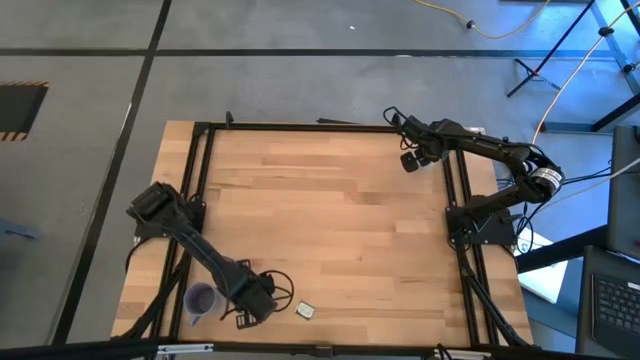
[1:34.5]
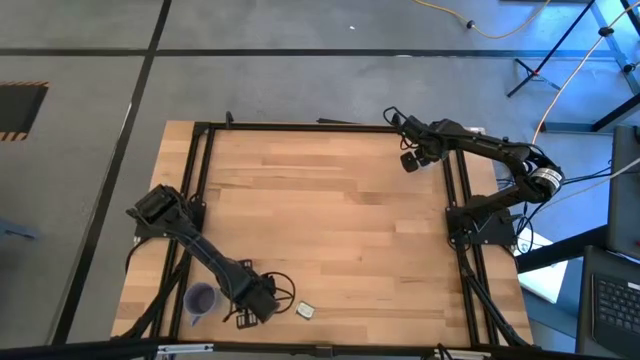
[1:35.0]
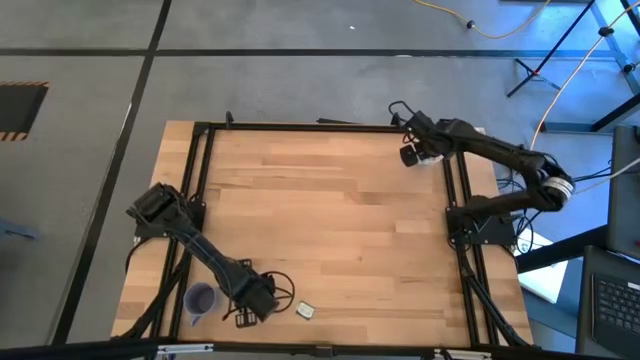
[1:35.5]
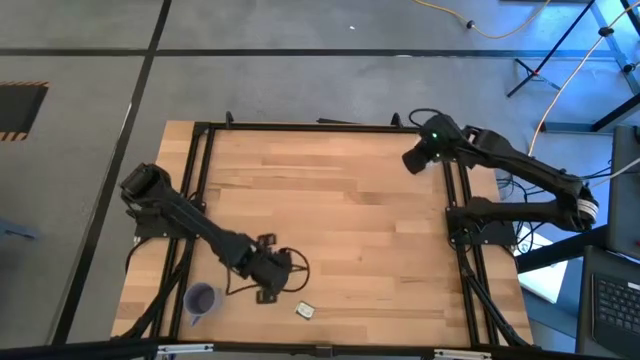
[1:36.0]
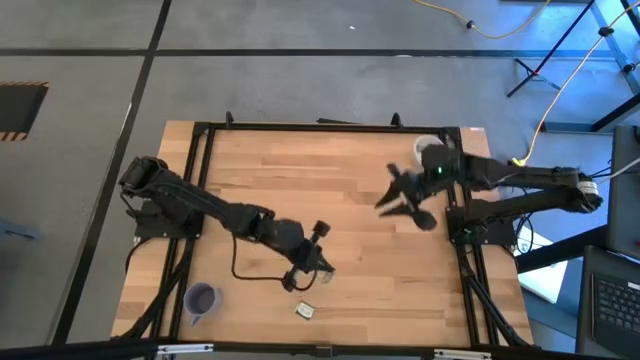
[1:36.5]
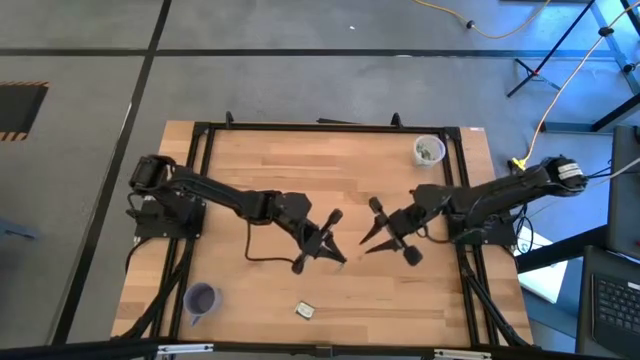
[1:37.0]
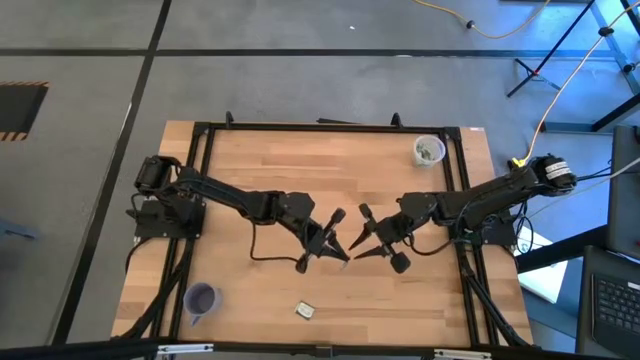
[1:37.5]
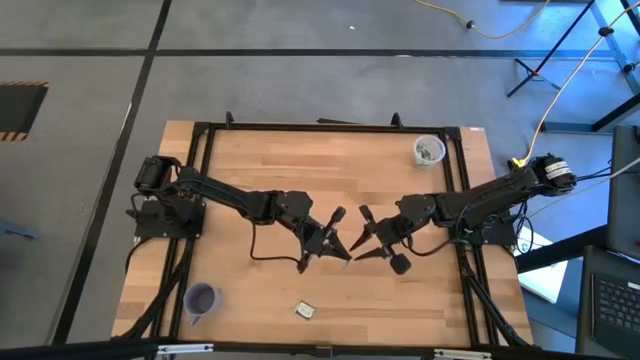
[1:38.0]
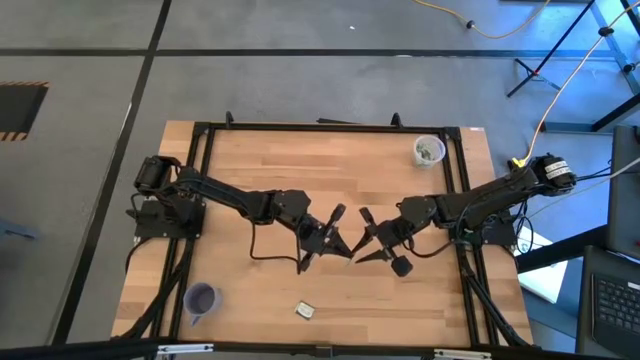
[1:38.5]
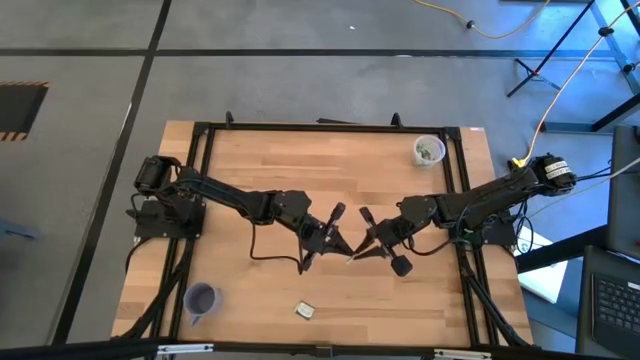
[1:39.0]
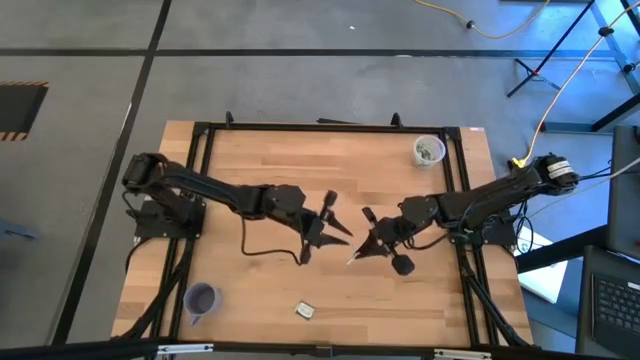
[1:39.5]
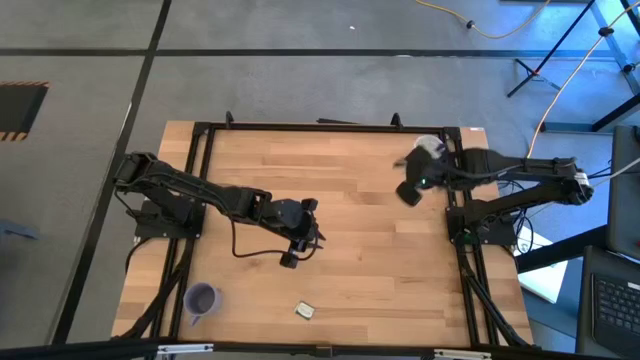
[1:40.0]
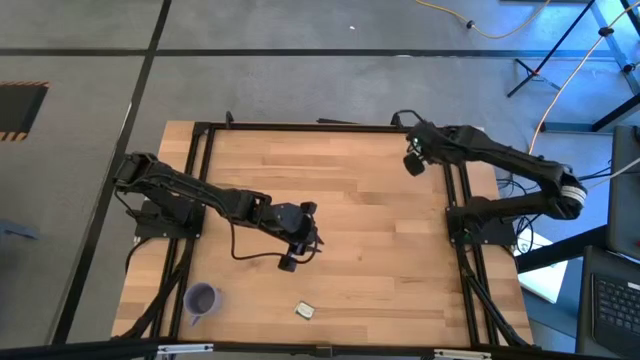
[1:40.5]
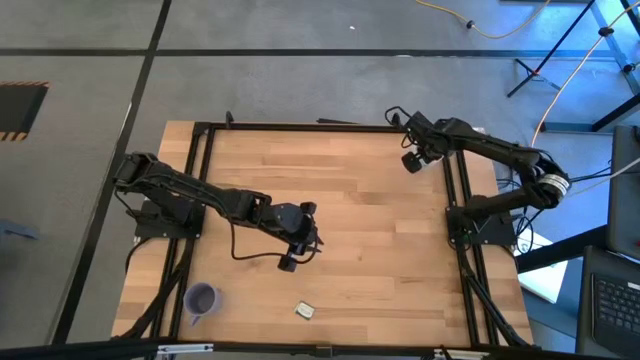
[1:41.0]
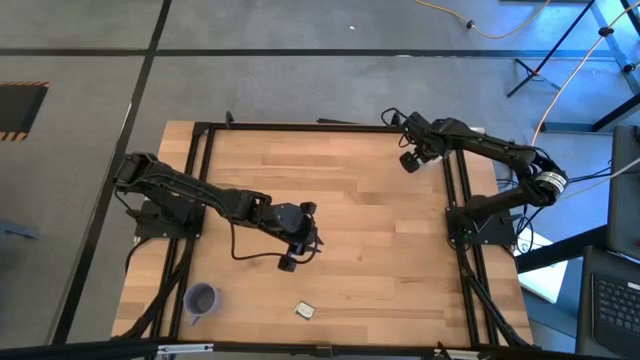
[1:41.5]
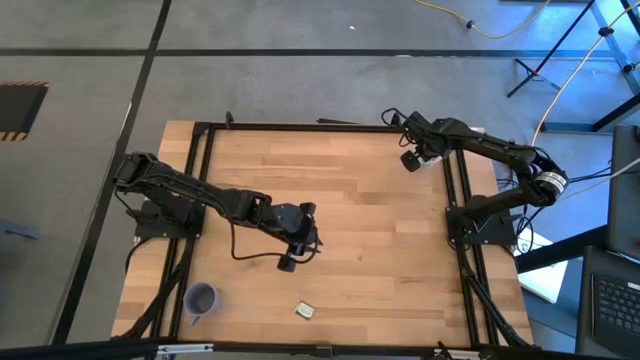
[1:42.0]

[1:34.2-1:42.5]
Task: Pick and place Stevia / Truvia into bins
Put the left green stevia packet into the transparent container

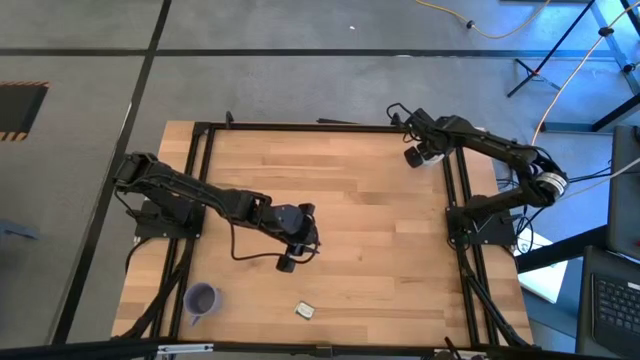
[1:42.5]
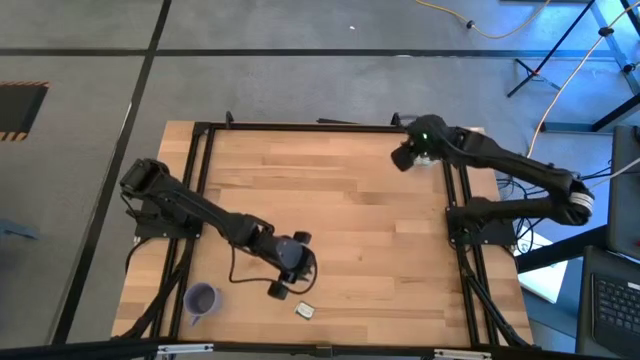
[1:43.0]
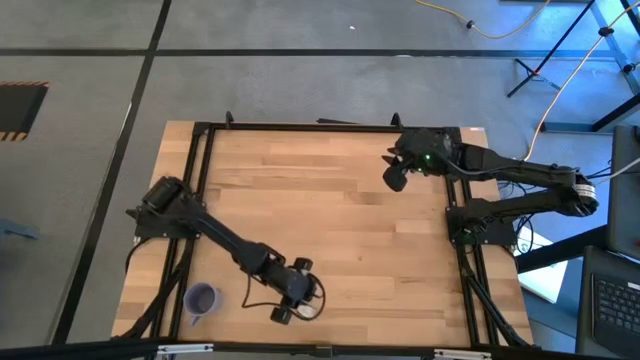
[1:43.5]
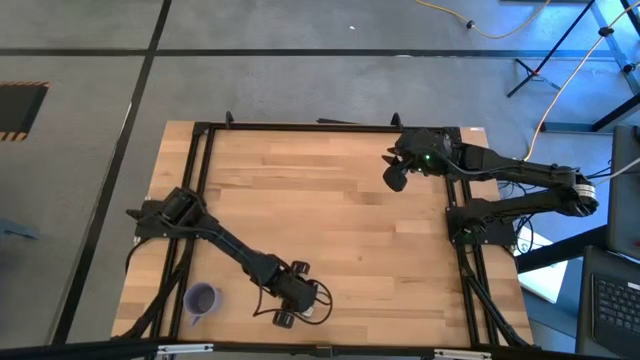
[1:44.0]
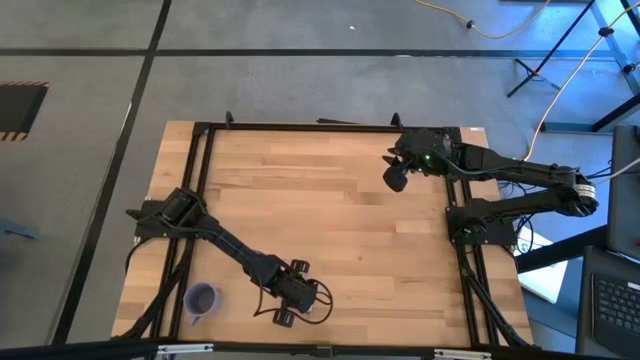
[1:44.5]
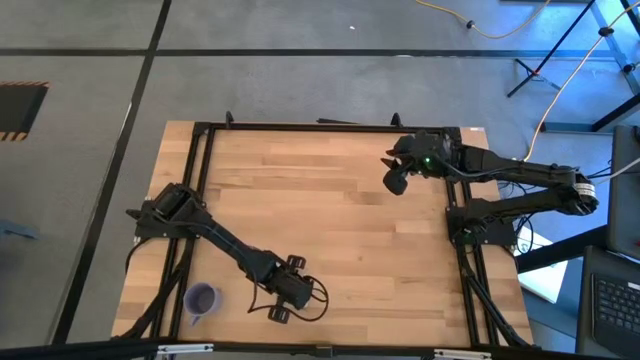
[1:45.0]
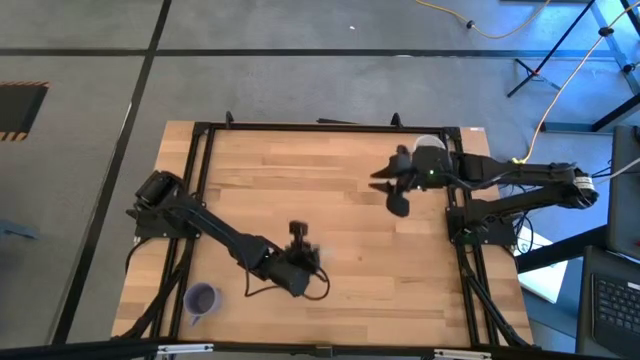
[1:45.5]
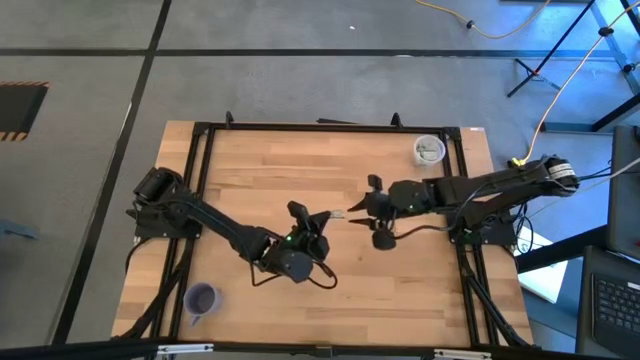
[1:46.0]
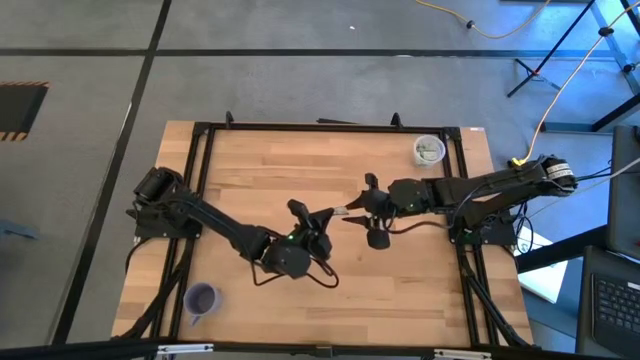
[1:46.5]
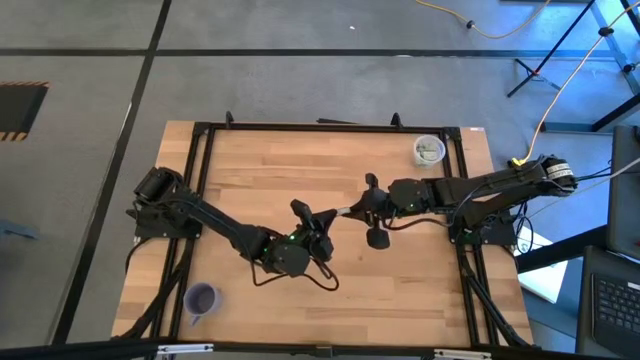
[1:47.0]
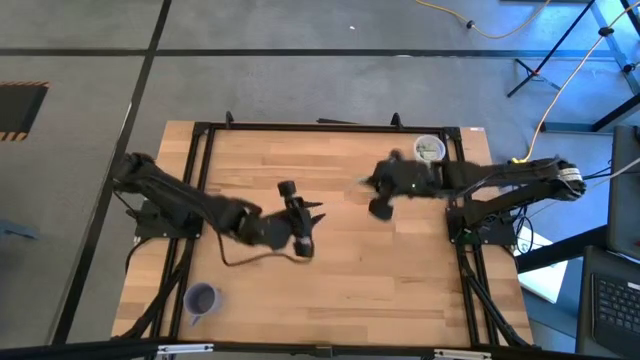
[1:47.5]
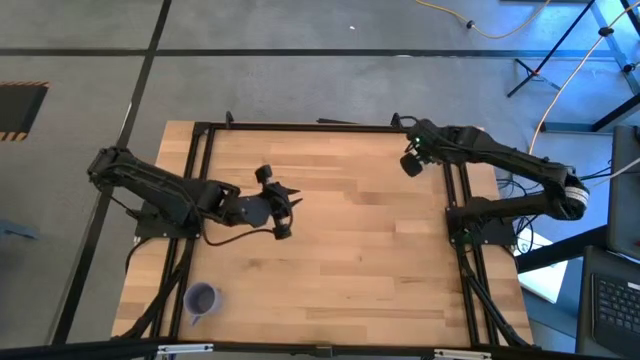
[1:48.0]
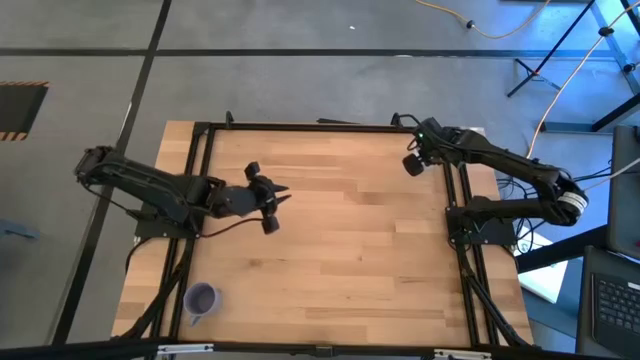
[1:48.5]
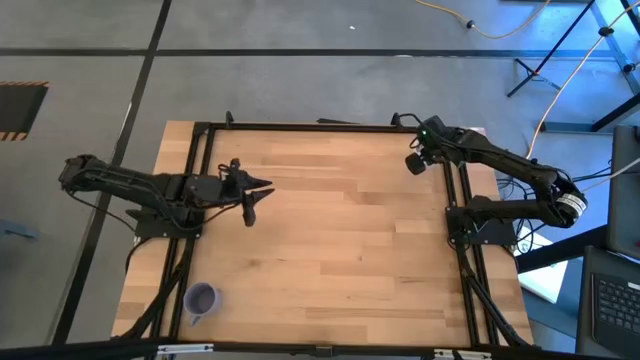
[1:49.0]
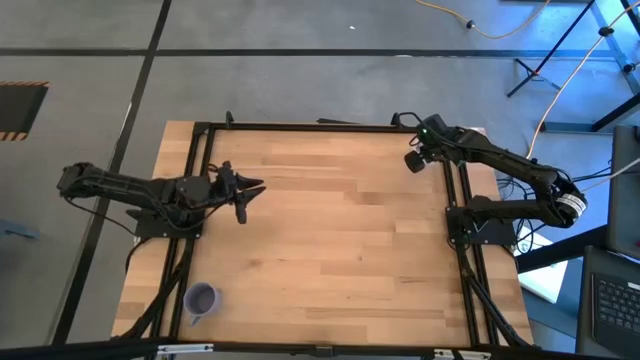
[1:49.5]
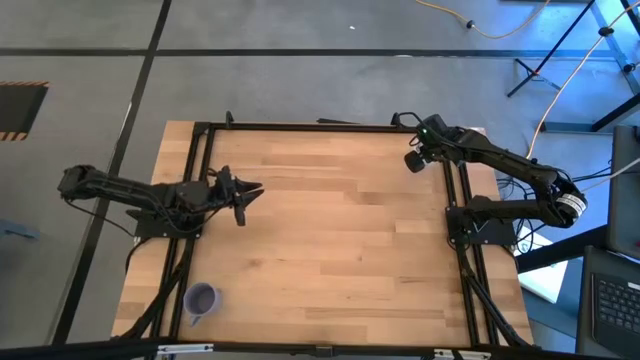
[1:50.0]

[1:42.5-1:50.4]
Put the green stevia packet into the transparent container

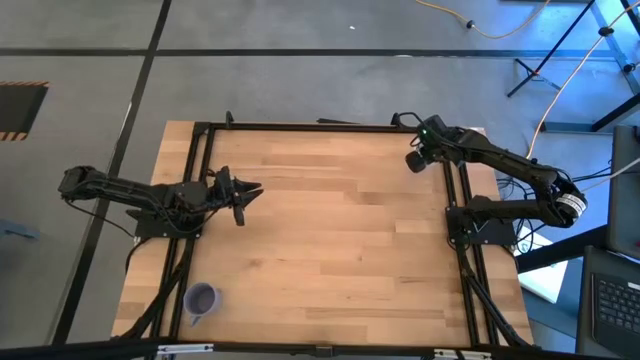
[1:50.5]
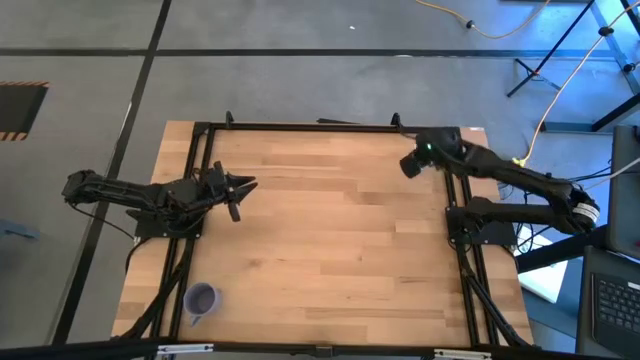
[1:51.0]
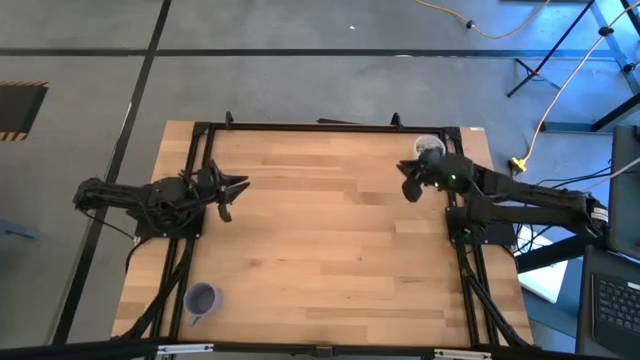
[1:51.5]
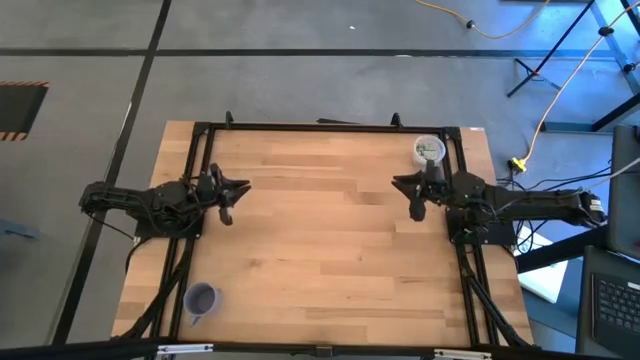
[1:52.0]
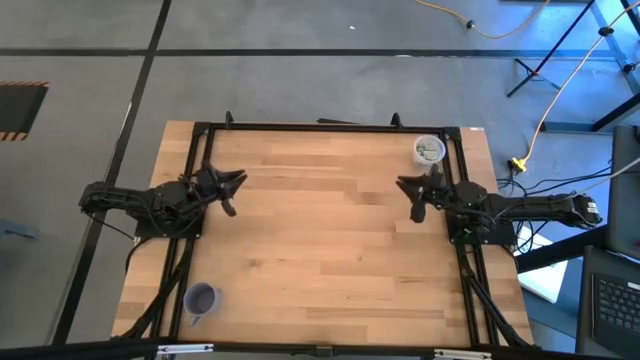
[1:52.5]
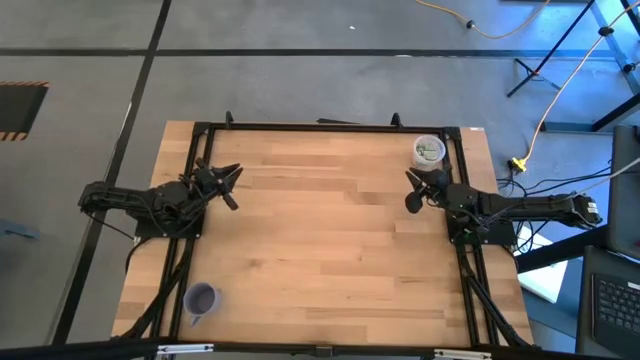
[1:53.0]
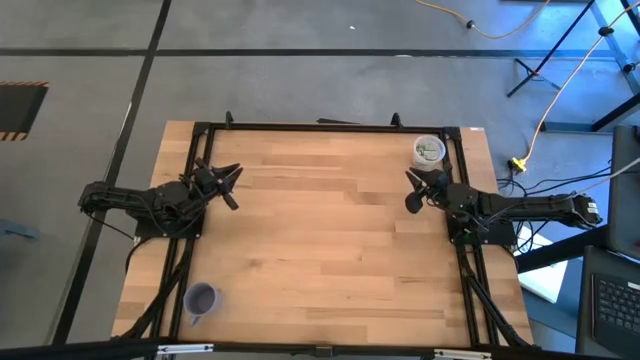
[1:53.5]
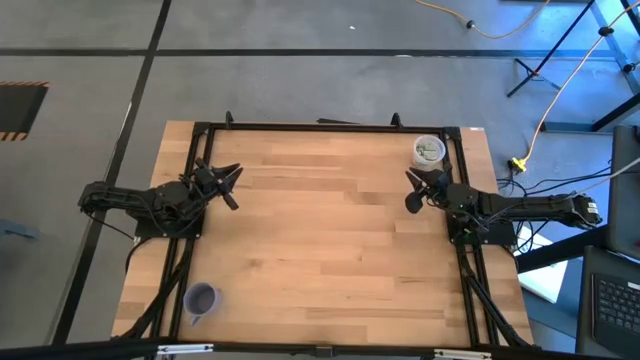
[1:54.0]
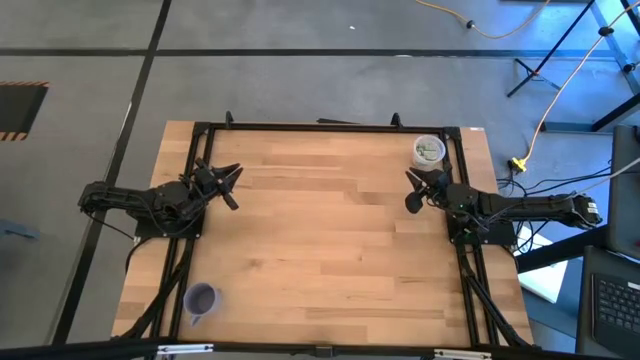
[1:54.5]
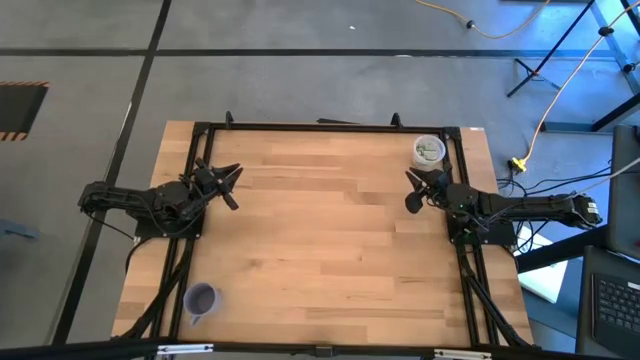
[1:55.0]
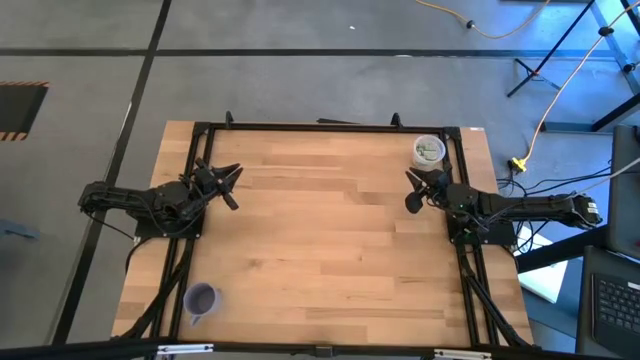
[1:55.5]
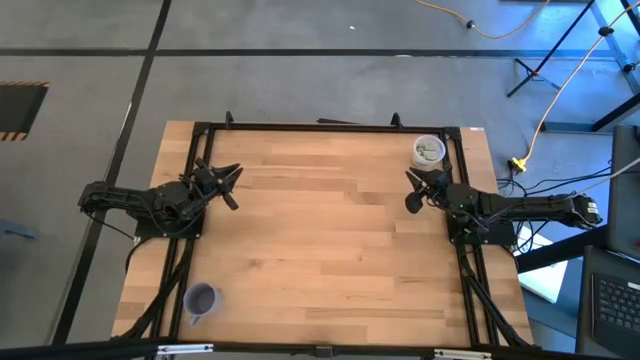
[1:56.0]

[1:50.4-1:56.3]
Return to Home Position
